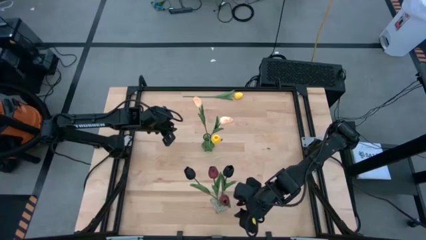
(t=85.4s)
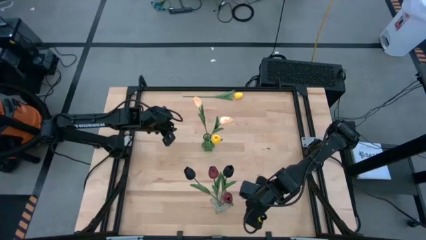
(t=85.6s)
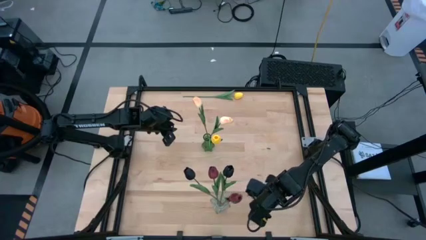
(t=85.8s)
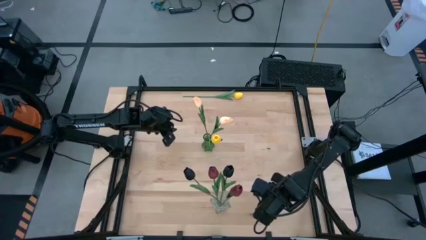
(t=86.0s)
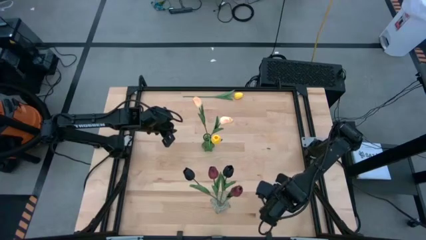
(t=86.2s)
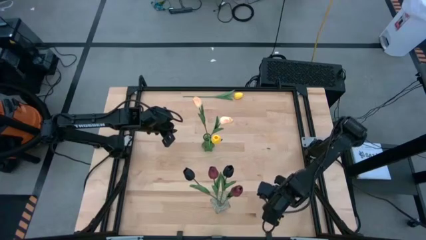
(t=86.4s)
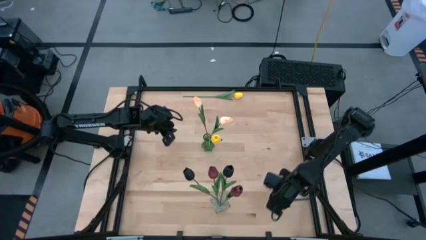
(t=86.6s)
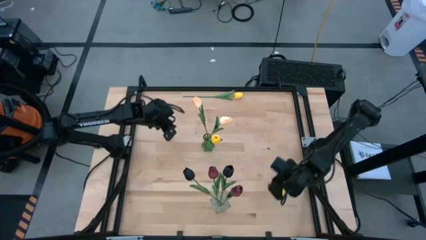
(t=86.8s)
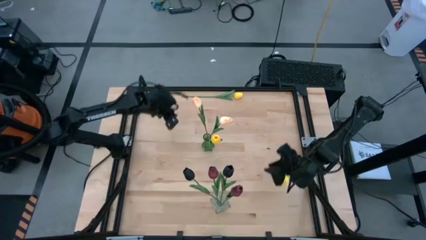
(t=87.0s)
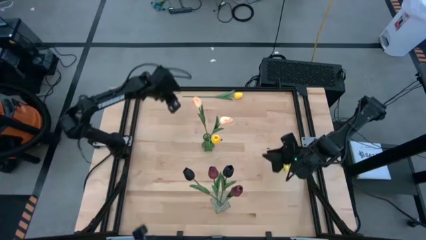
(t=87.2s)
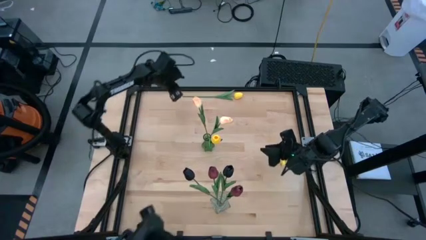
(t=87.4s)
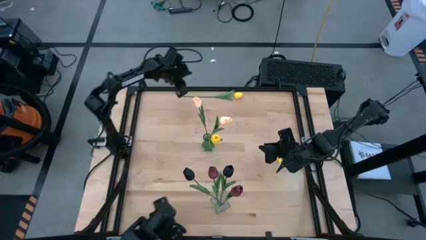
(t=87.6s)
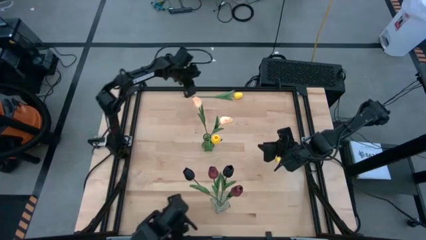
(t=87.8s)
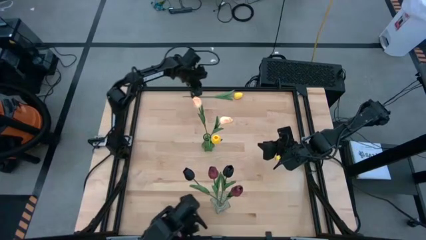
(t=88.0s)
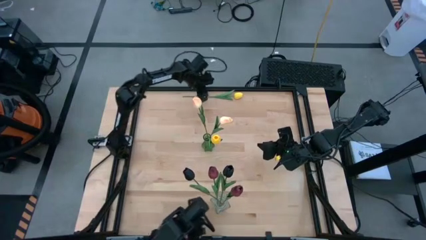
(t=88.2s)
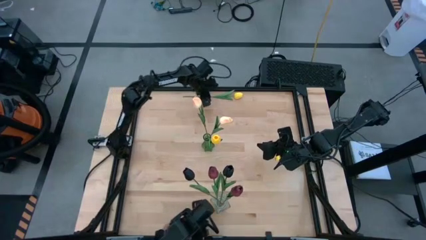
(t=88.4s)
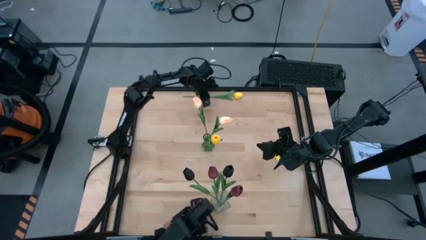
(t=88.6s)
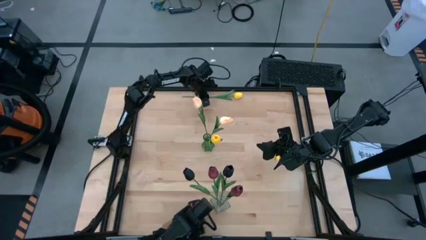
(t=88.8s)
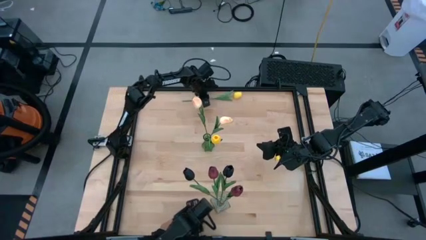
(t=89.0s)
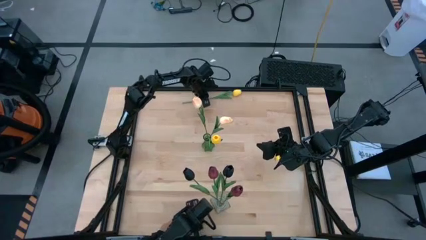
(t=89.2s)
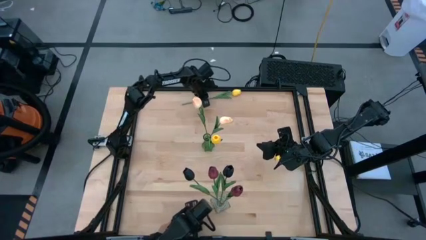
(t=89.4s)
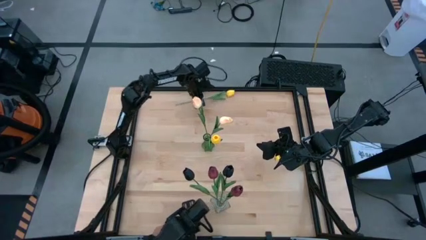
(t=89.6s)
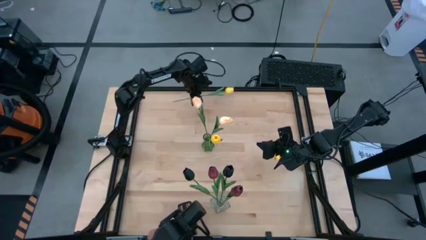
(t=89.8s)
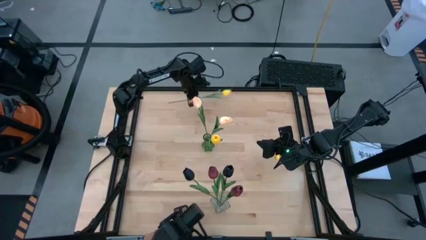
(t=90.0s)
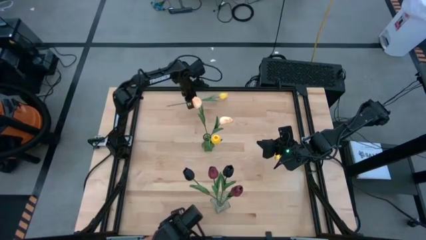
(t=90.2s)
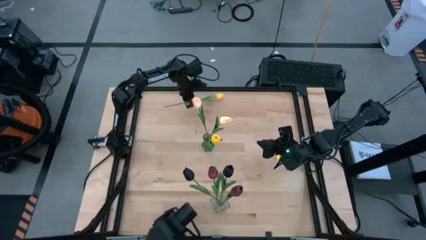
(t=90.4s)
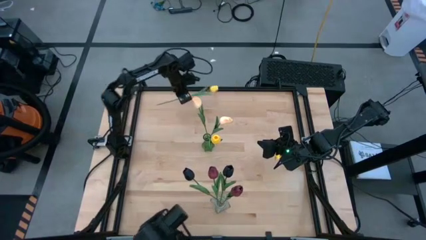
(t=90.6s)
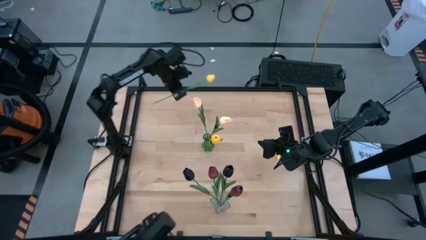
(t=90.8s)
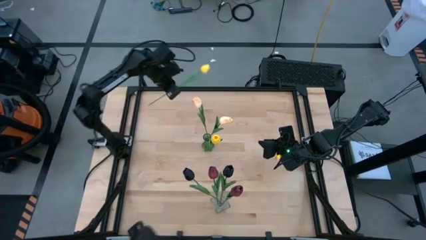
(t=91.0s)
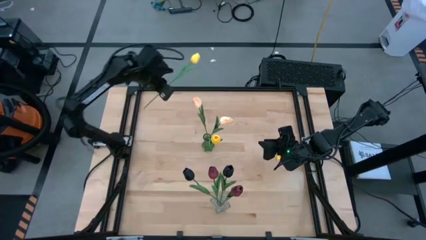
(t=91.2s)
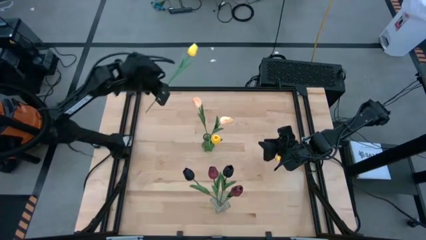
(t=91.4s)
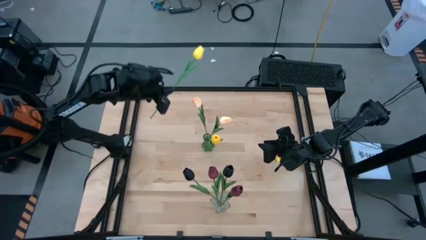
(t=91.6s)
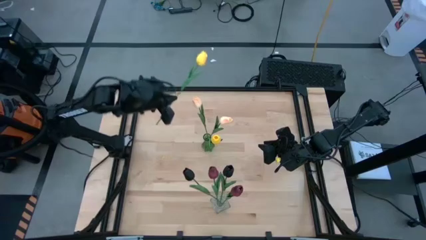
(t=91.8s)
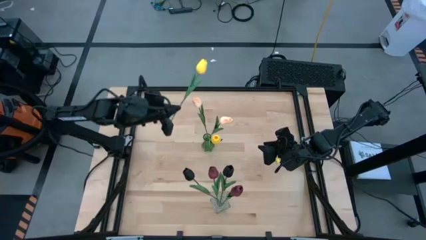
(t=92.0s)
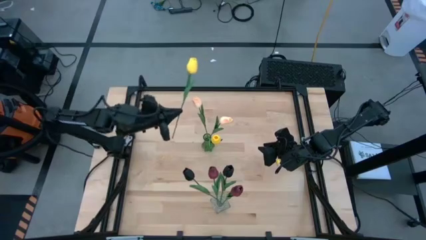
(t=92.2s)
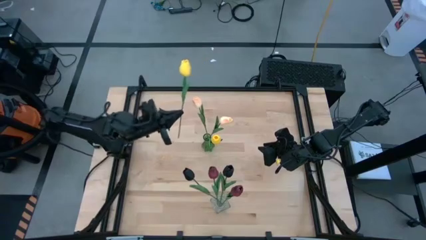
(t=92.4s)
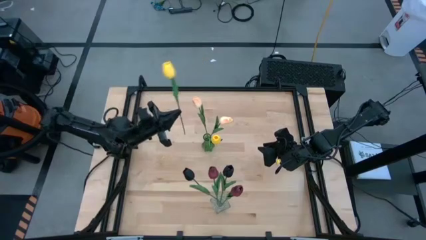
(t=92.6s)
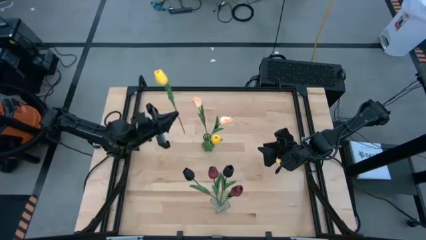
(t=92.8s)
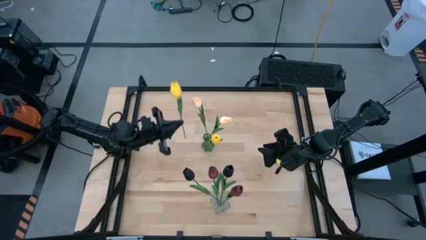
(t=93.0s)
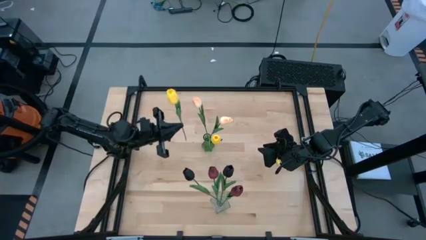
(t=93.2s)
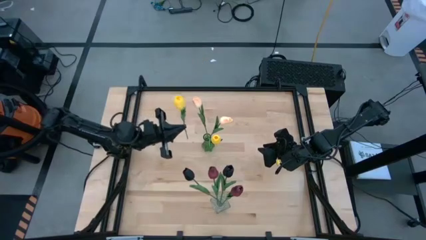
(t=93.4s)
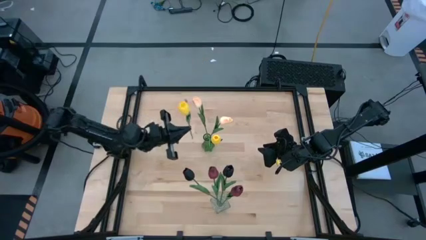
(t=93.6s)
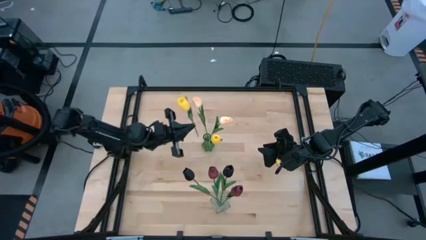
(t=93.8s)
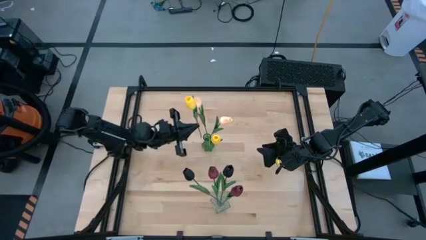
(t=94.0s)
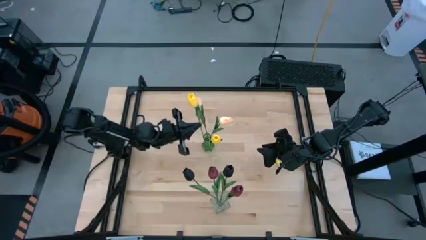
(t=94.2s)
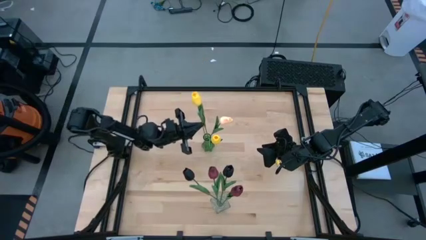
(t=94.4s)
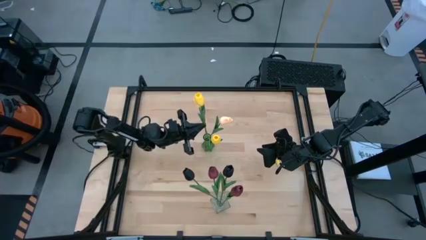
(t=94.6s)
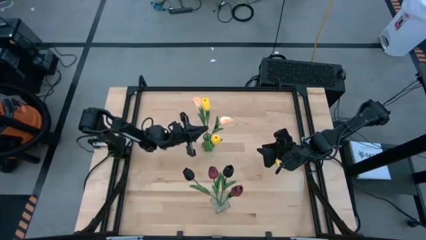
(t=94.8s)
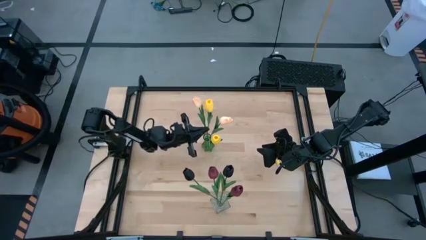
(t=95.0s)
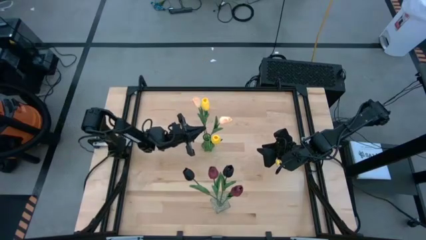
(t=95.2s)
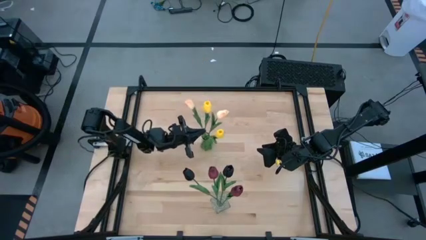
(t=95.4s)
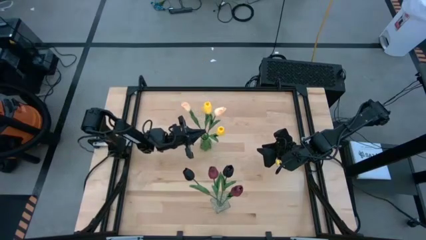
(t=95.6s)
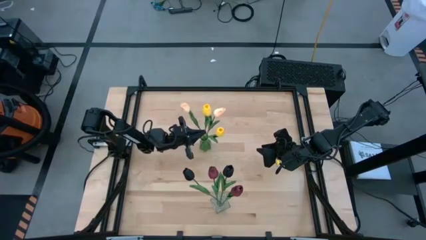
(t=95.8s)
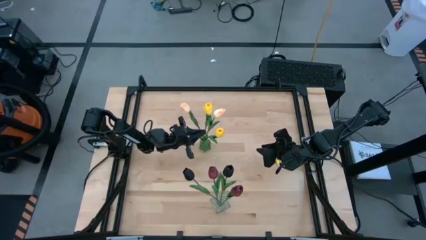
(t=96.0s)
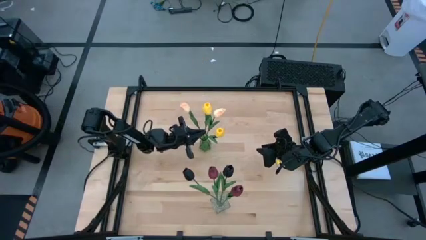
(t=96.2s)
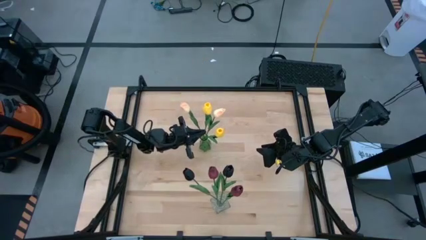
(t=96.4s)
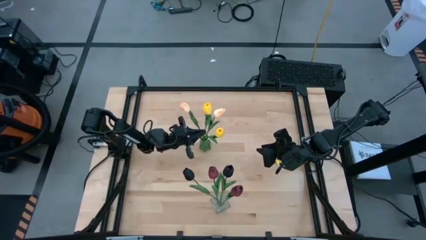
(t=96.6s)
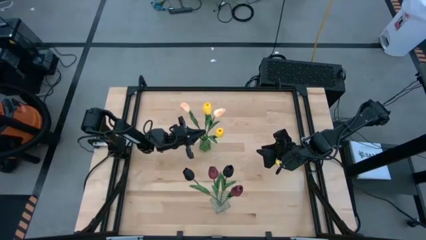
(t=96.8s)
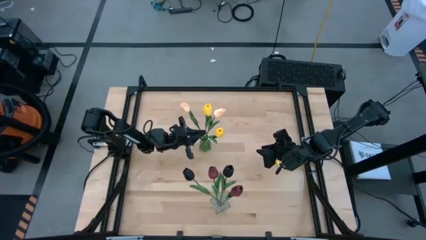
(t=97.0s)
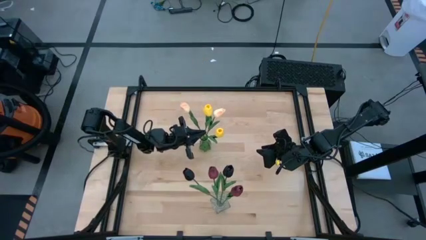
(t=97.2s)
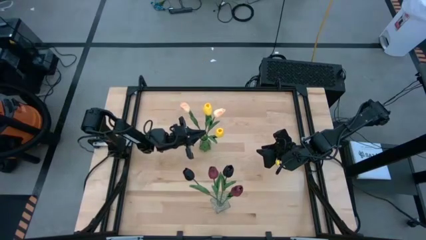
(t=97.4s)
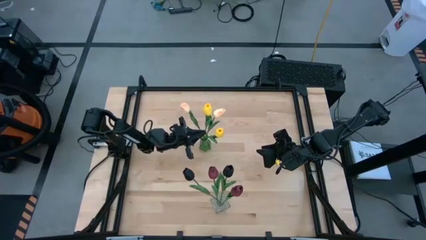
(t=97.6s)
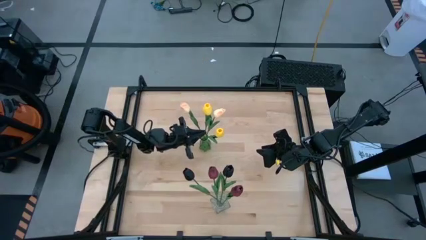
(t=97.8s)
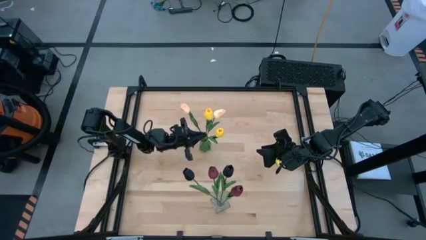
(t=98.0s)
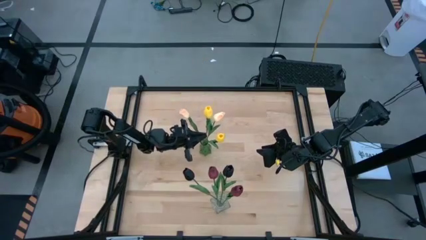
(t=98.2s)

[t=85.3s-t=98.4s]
Task: Sort flowers into vase by color
Put the yellow flower into the green vase
